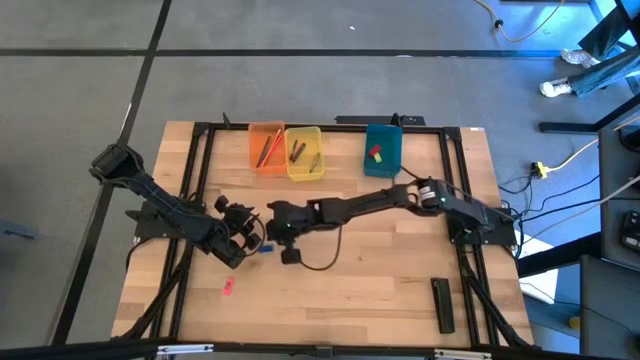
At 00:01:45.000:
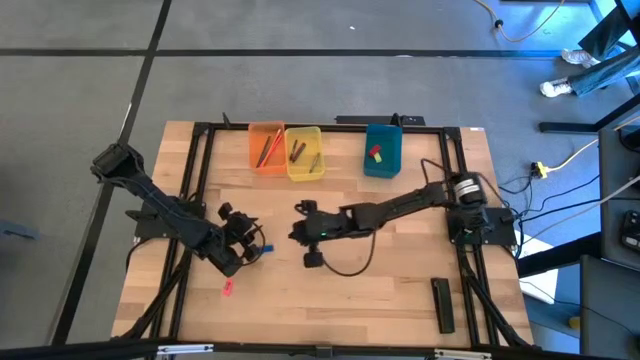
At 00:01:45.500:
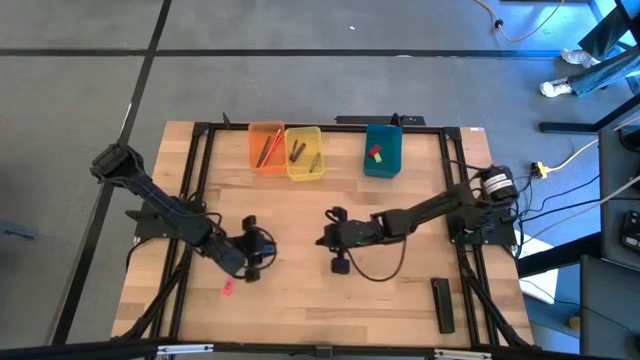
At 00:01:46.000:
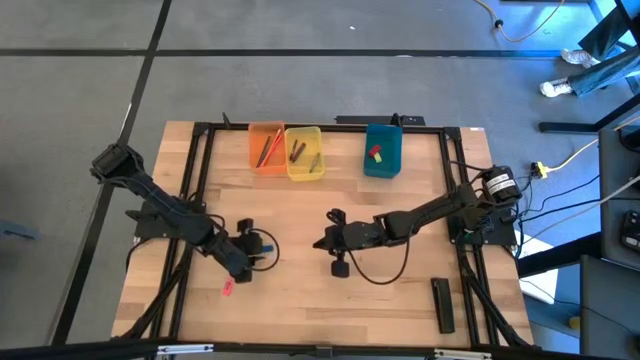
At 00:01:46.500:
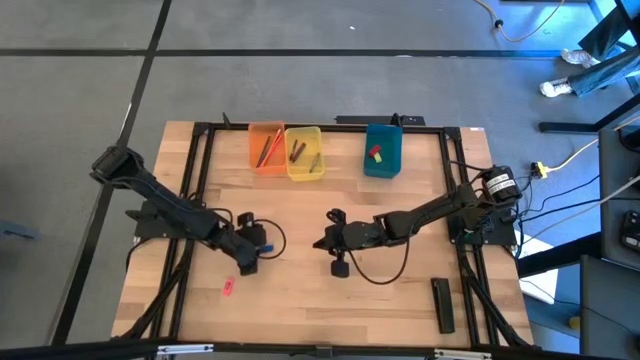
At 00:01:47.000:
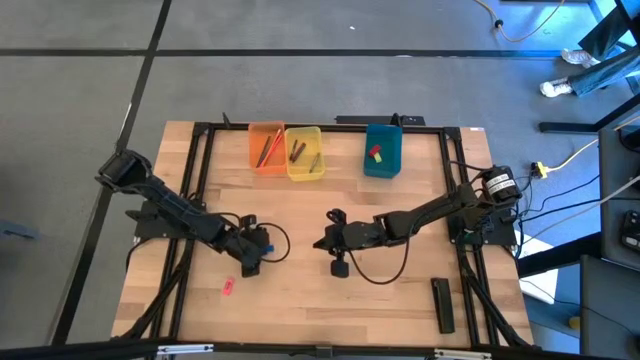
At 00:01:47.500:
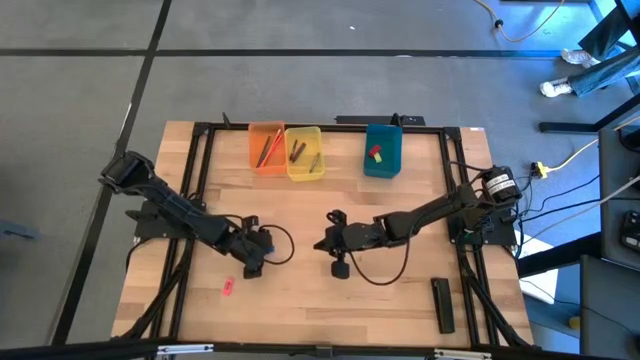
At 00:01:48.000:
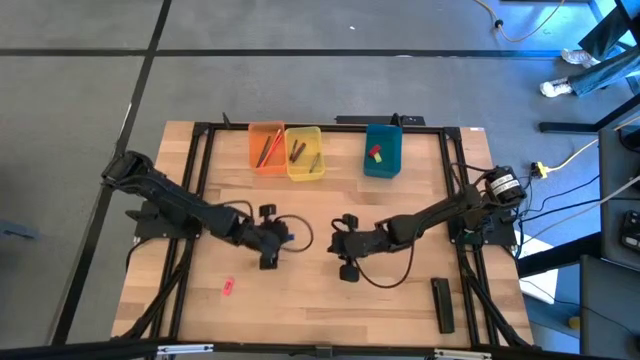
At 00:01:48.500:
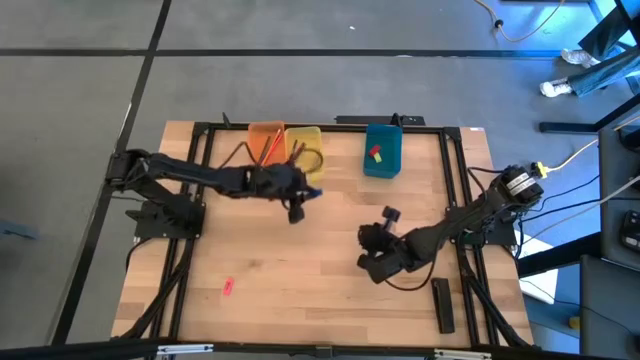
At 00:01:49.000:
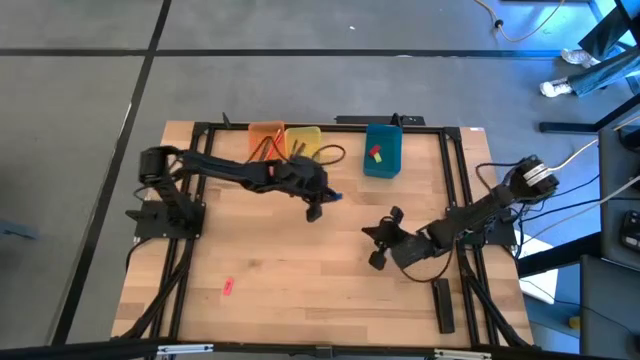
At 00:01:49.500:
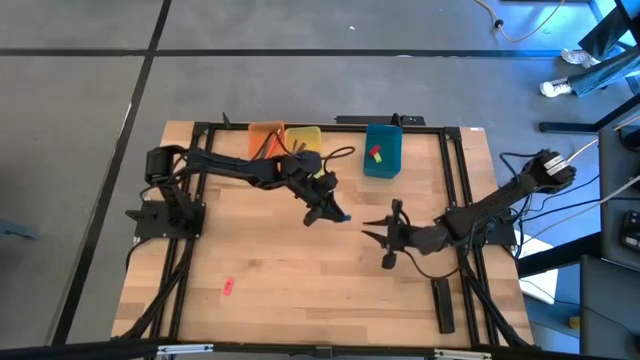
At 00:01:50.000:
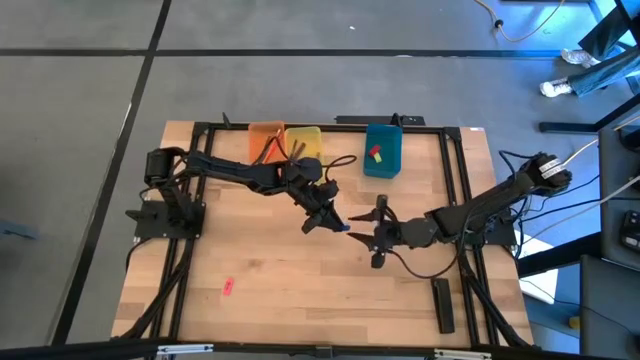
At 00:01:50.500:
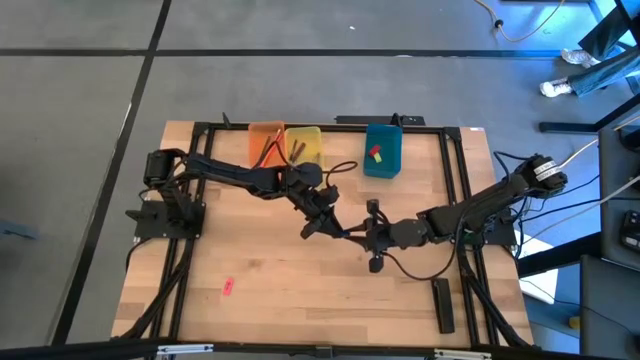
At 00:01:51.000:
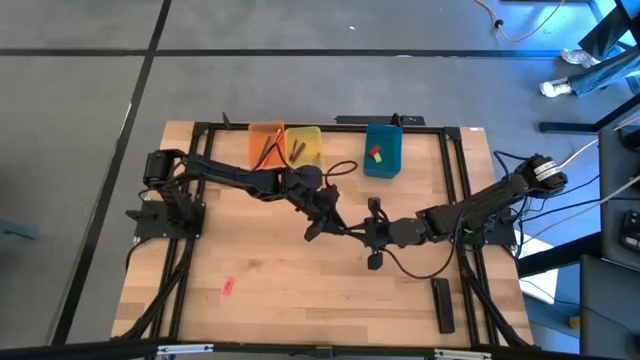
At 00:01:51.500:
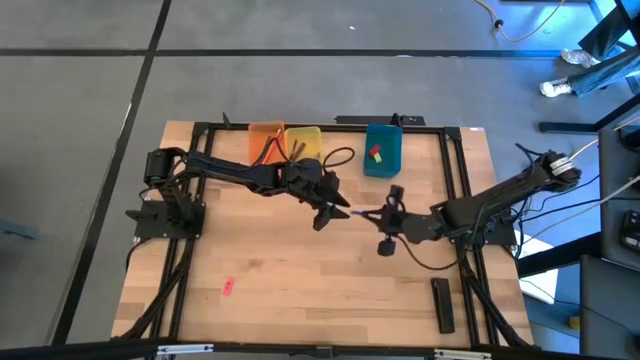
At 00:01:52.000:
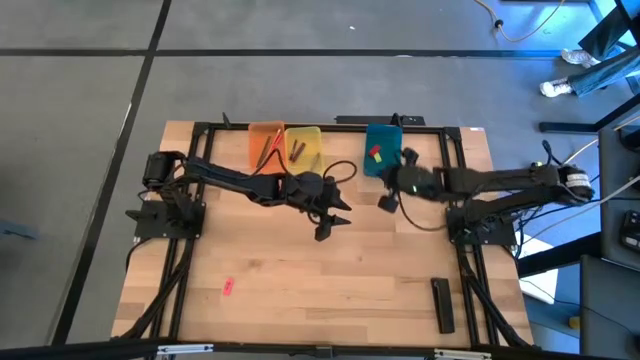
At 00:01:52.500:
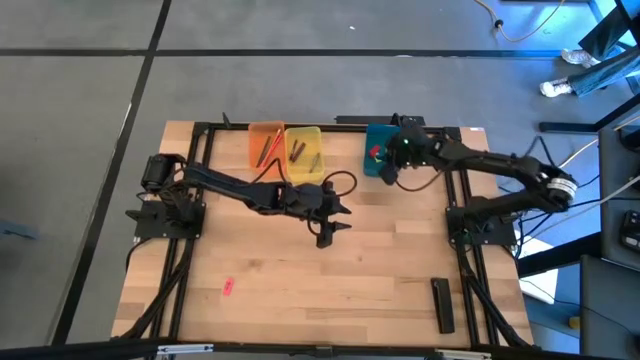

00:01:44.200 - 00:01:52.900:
Task: Sort crayons/erasers/pens/pencils in bins
Put the blue eraser into the blue bin

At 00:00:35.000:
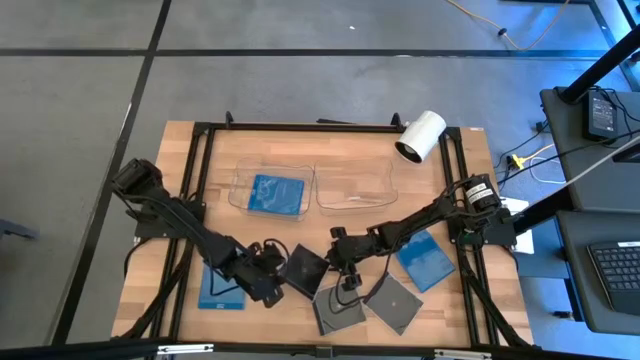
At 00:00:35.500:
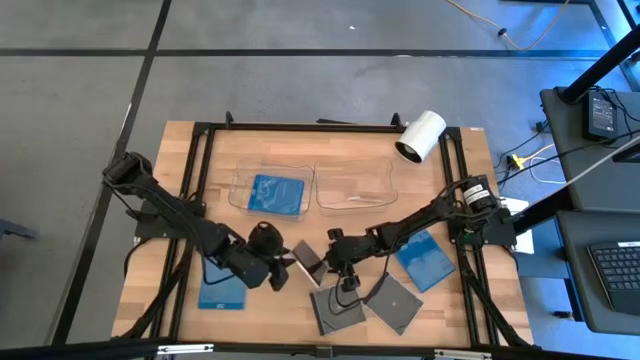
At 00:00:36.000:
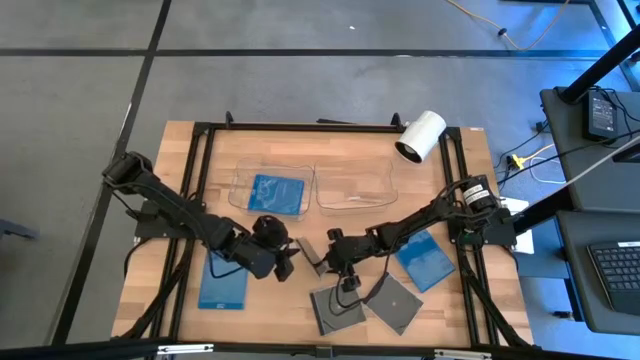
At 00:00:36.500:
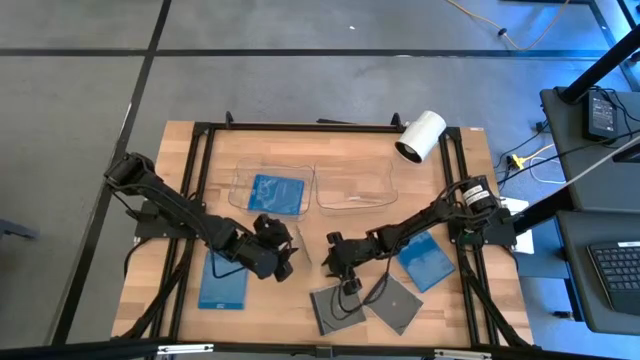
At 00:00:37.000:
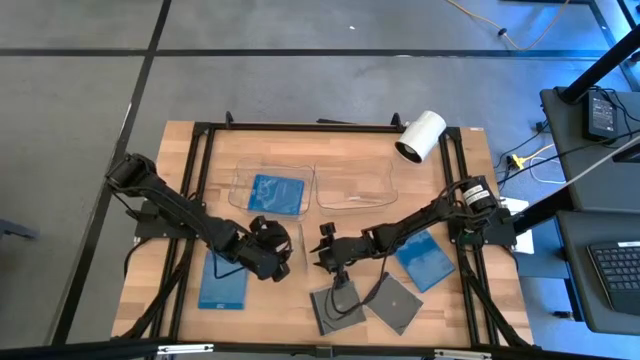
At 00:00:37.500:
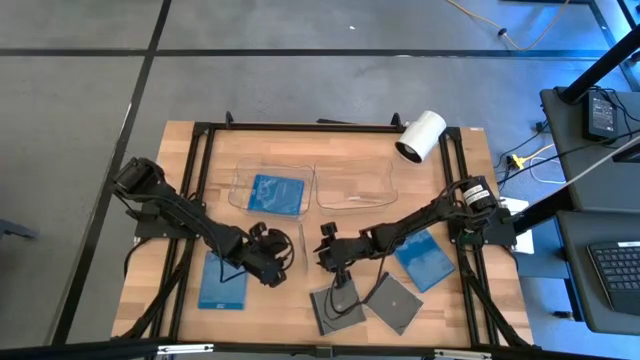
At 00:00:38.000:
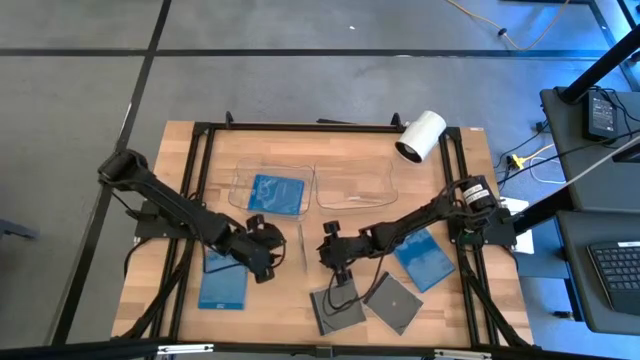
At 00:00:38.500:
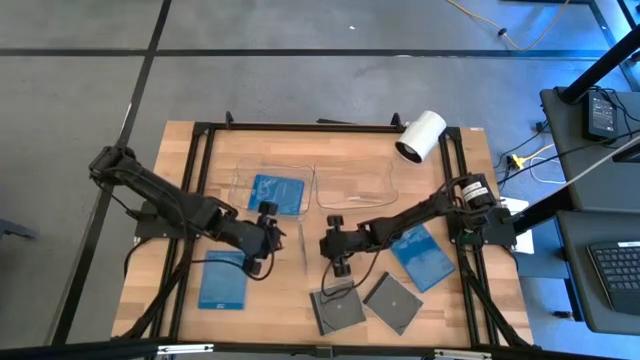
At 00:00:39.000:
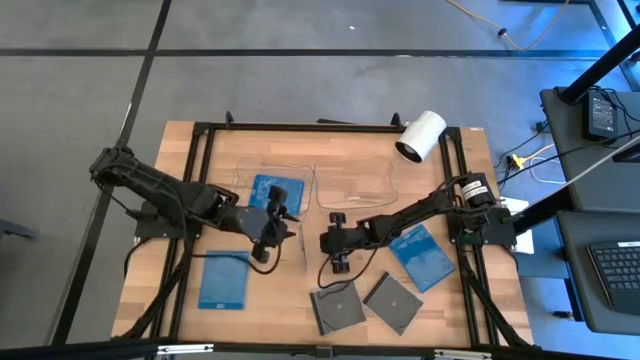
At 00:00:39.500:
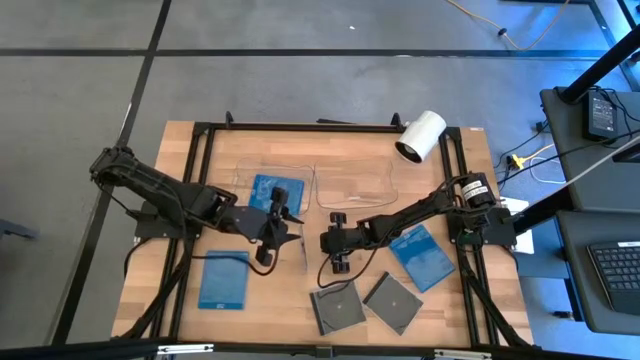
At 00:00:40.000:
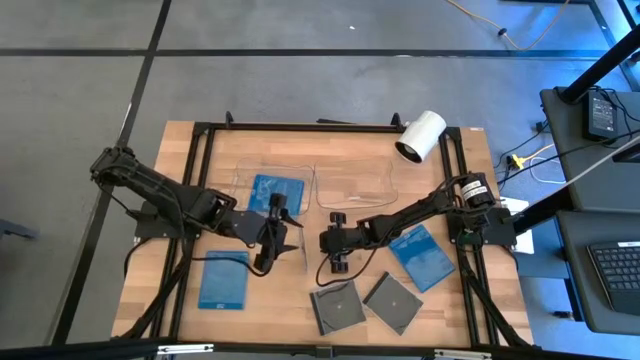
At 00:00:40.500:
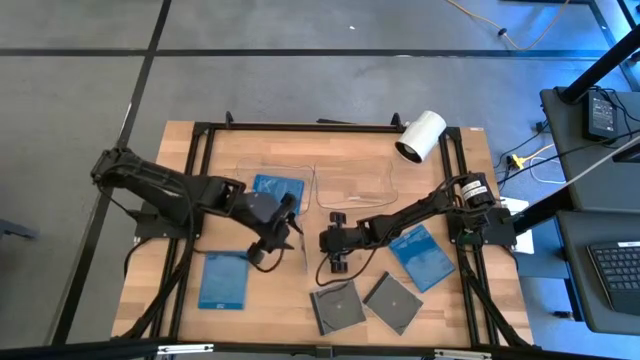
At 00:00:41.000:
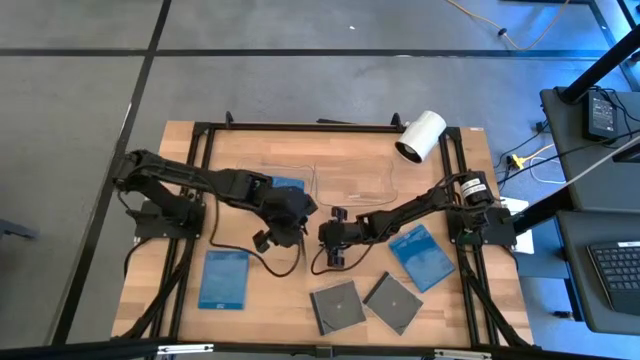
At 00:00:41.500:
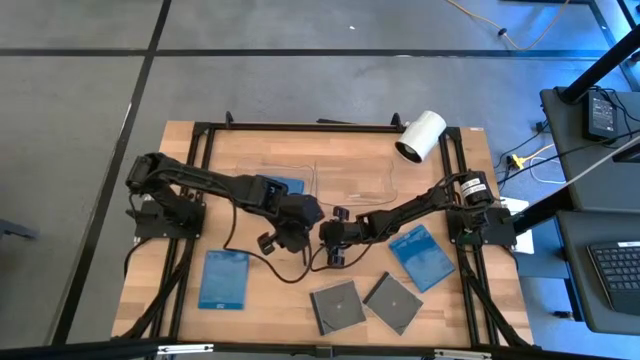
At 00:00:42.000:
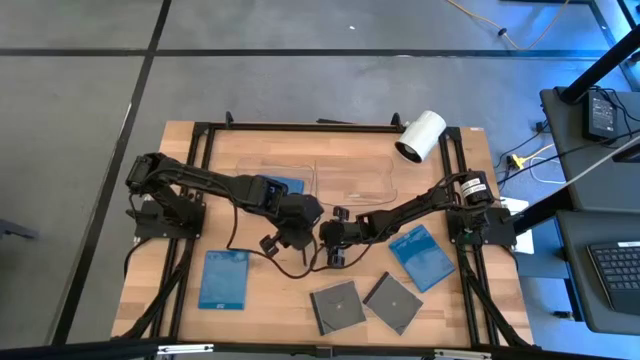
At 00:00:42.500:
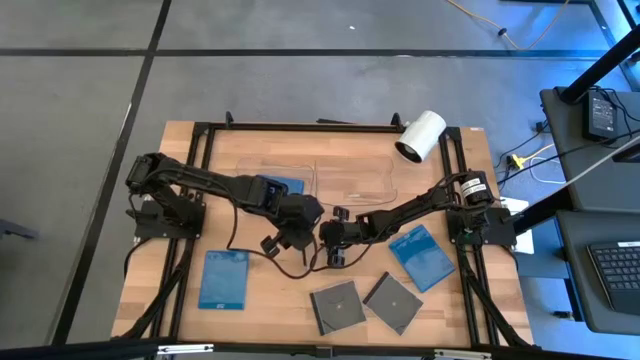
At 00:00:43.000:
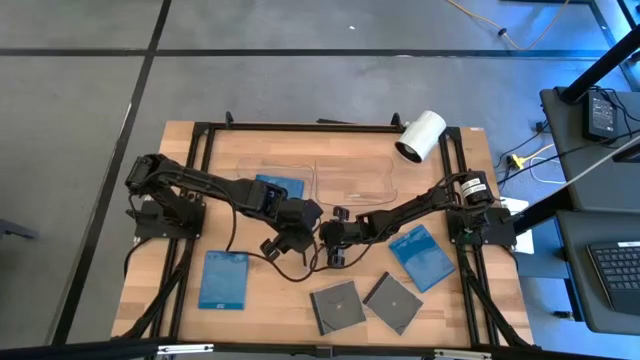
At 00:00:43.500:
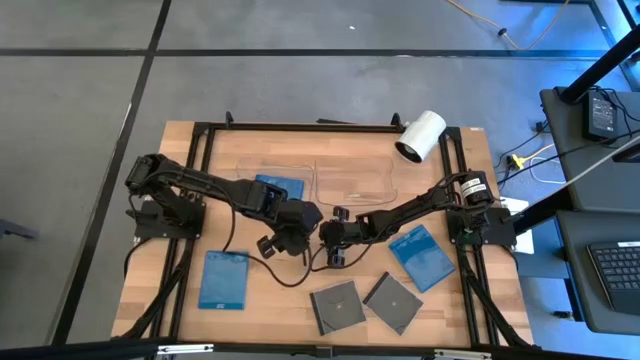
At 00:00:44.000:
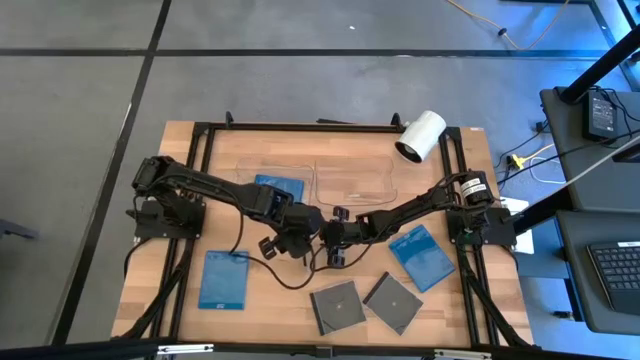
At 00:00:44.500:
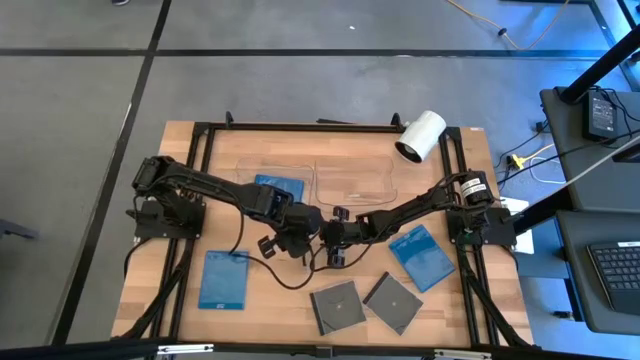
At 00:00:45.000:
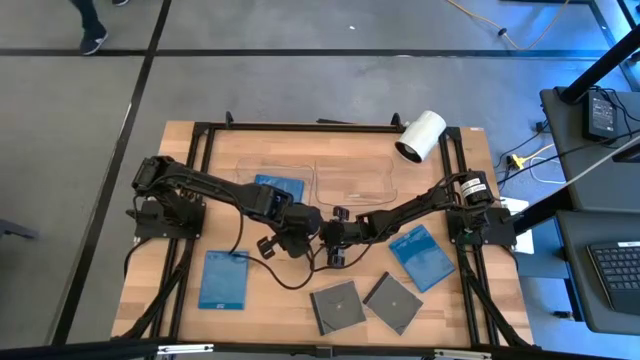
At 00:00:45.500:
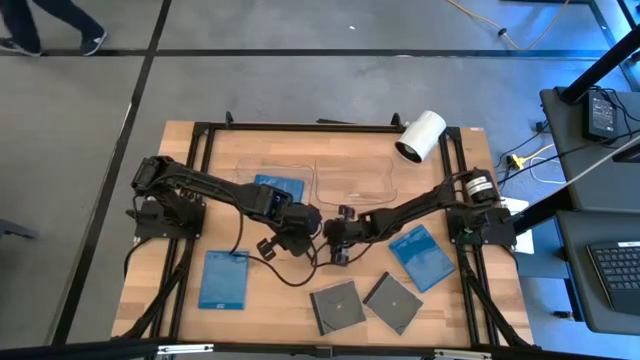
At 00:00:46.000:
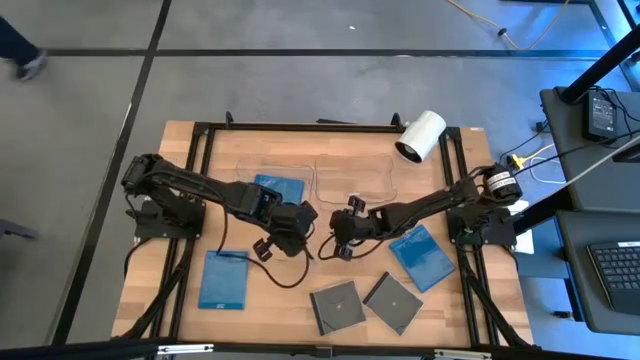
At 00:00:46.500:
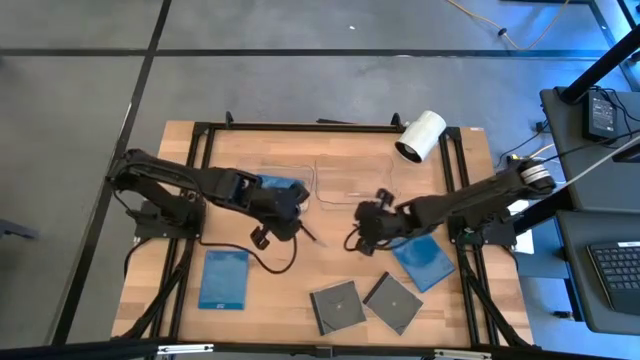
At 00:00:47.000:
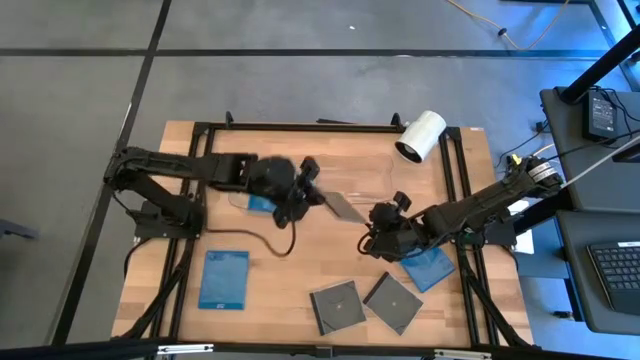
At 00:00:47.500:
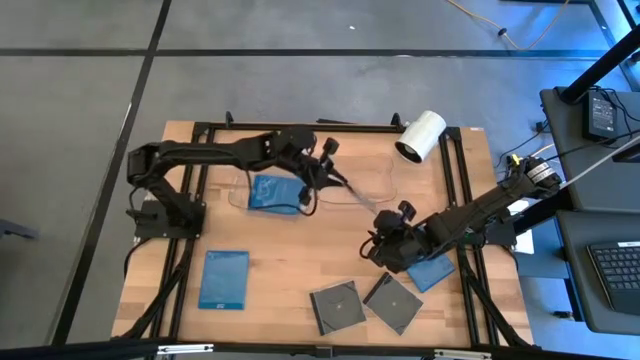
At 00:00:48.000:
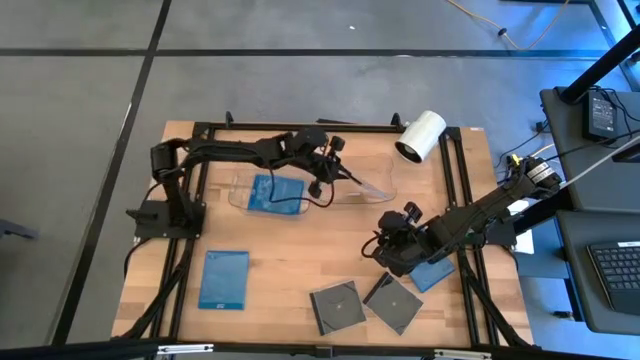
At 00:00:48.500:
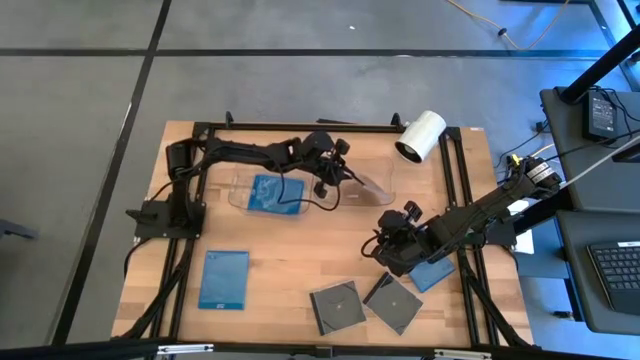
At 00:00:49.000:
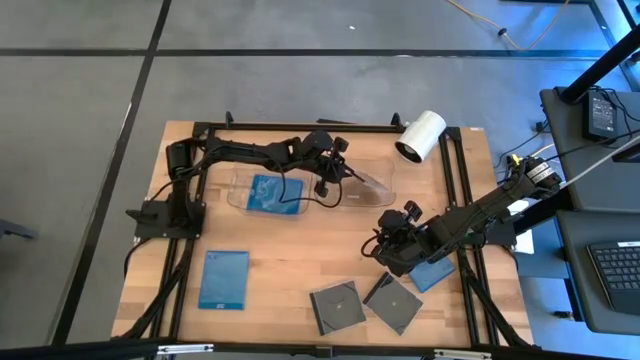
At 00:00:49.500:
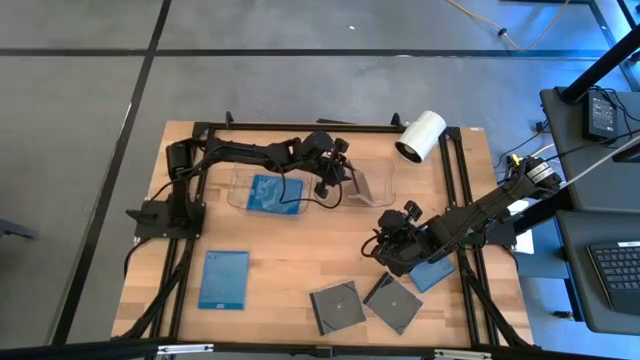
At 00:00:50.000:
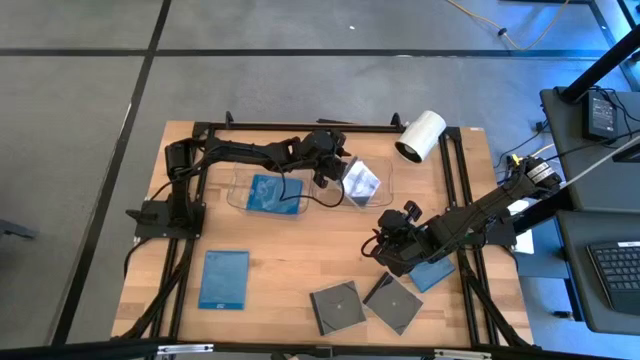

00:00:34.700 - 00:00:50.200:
Task: Pick & place jewel cases by type
Put the left black CD case into the right transparent bin
